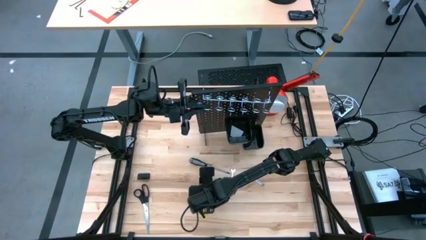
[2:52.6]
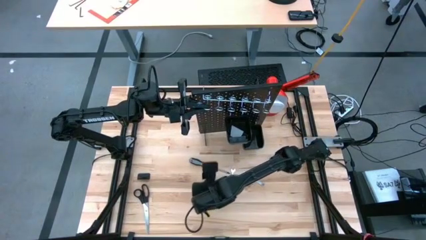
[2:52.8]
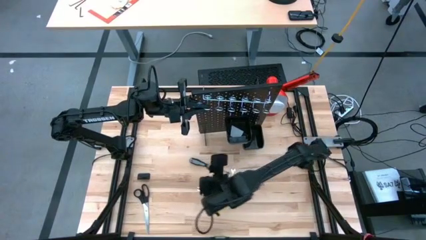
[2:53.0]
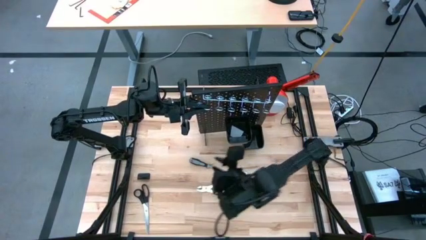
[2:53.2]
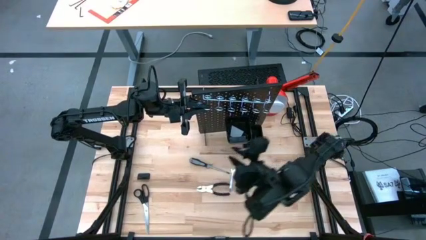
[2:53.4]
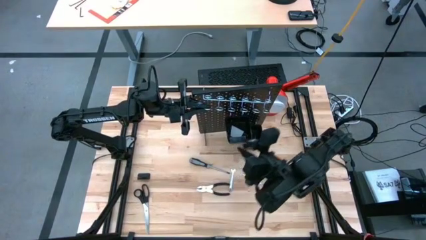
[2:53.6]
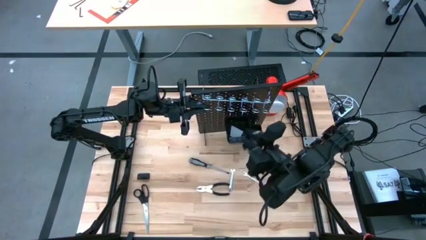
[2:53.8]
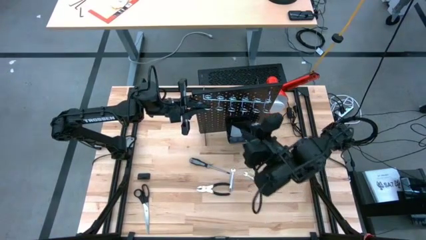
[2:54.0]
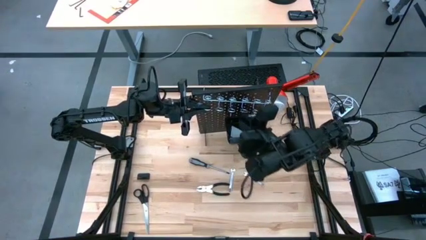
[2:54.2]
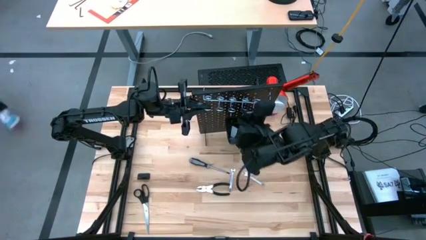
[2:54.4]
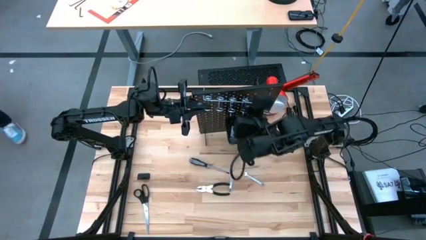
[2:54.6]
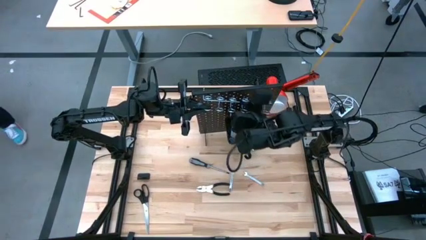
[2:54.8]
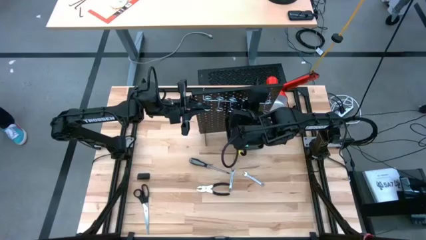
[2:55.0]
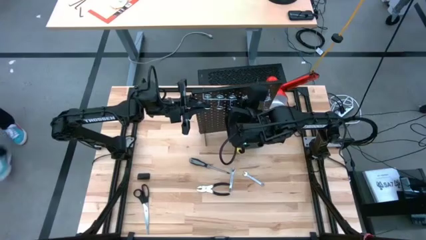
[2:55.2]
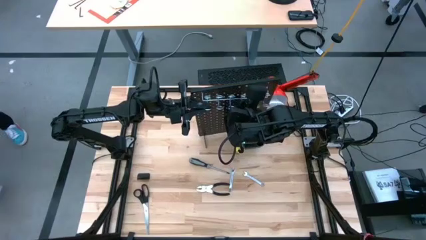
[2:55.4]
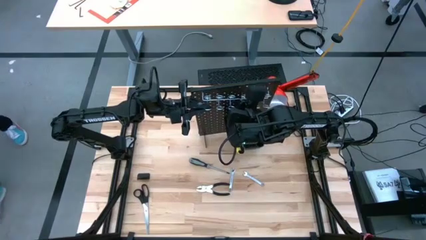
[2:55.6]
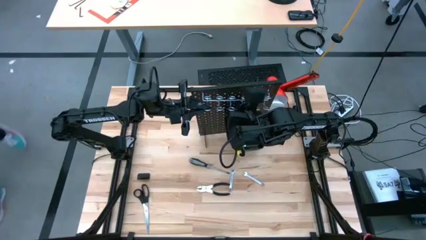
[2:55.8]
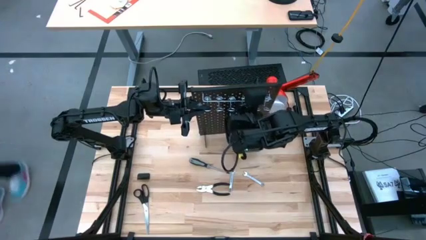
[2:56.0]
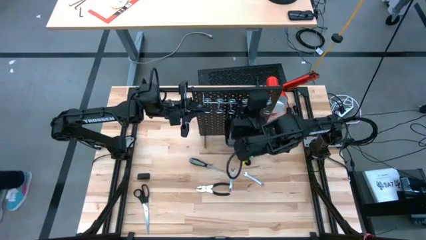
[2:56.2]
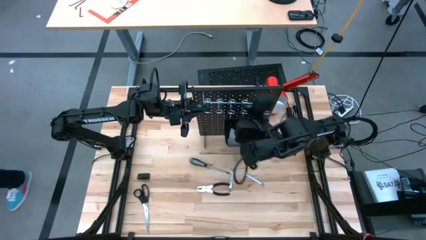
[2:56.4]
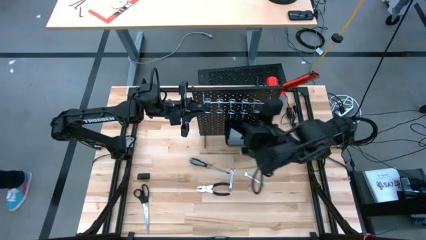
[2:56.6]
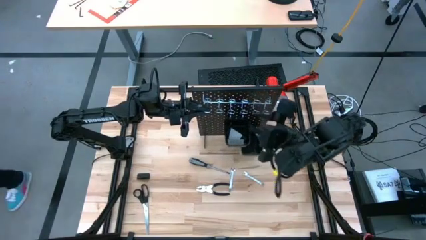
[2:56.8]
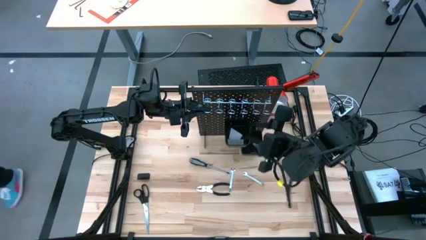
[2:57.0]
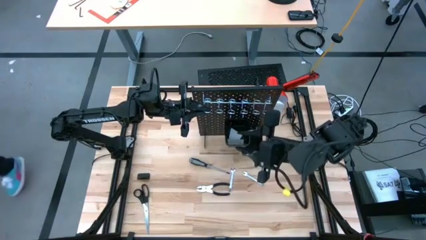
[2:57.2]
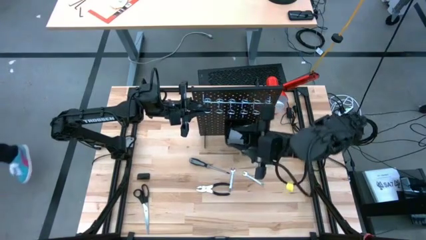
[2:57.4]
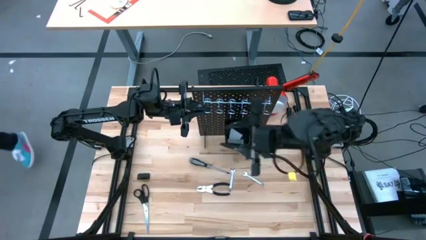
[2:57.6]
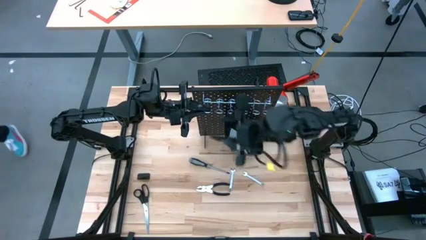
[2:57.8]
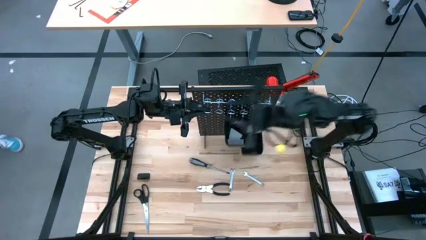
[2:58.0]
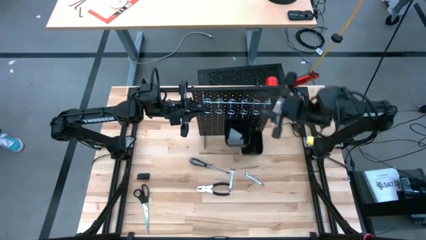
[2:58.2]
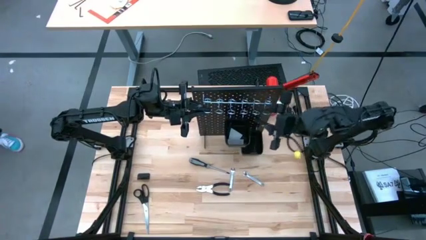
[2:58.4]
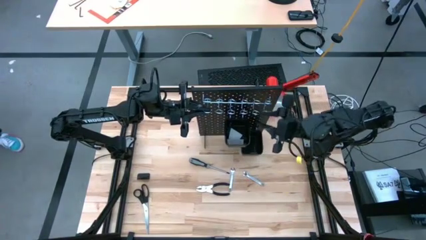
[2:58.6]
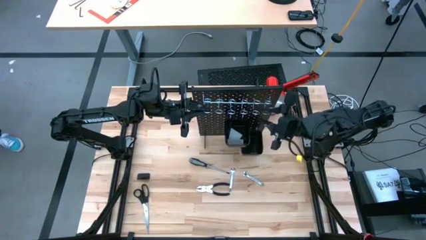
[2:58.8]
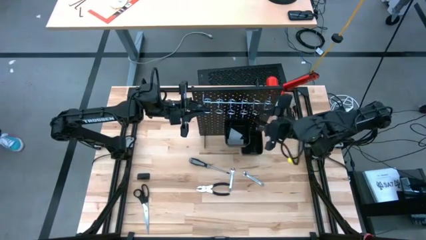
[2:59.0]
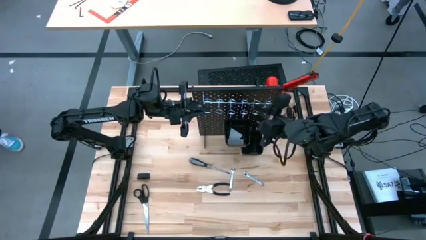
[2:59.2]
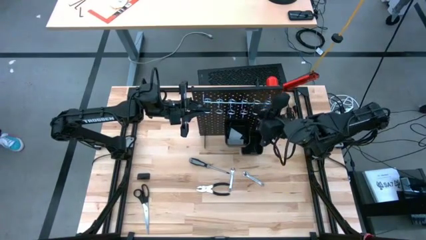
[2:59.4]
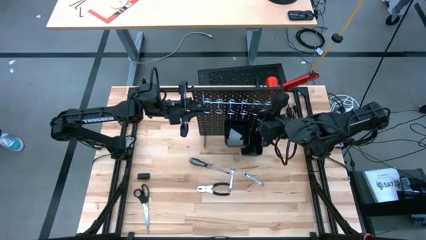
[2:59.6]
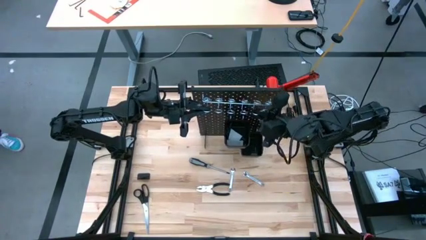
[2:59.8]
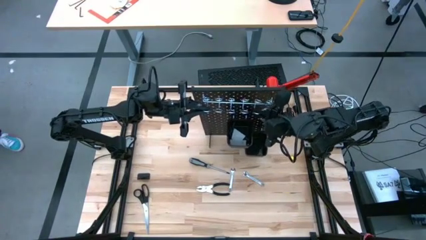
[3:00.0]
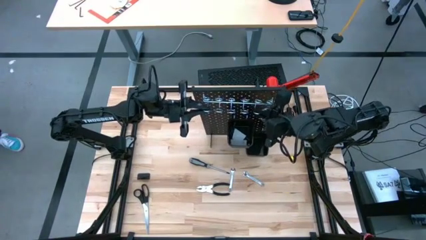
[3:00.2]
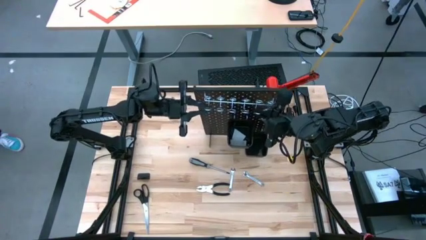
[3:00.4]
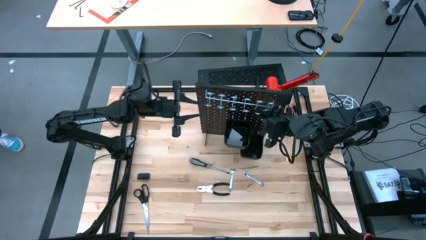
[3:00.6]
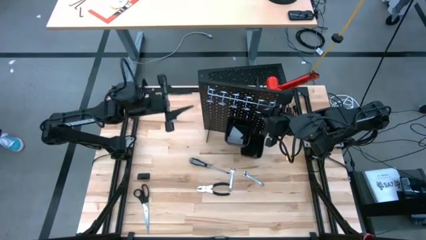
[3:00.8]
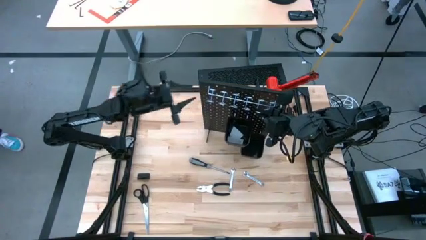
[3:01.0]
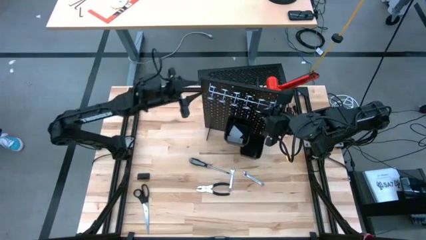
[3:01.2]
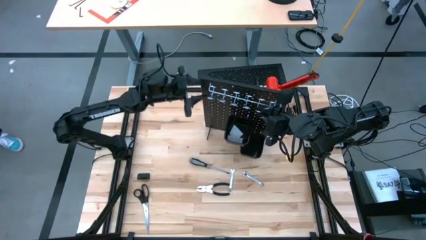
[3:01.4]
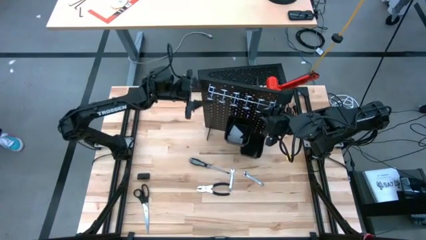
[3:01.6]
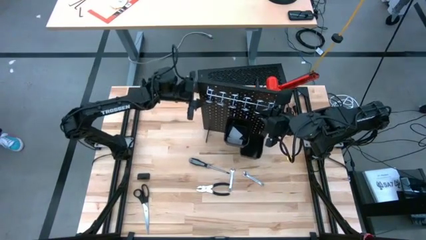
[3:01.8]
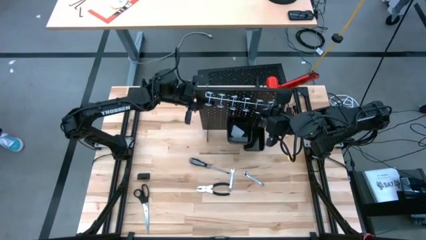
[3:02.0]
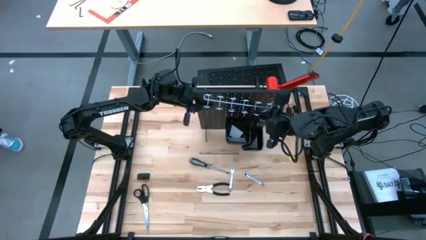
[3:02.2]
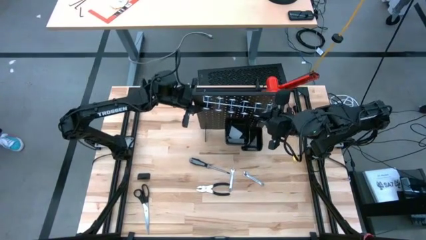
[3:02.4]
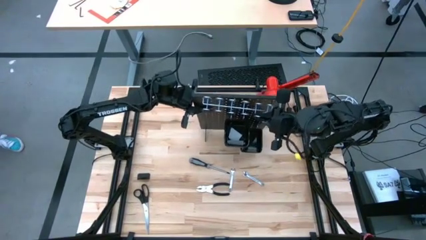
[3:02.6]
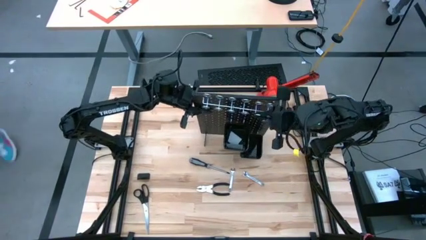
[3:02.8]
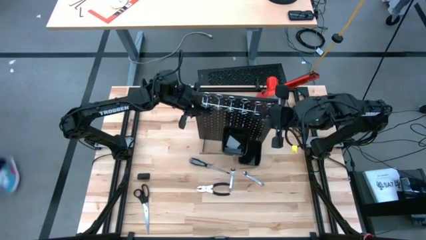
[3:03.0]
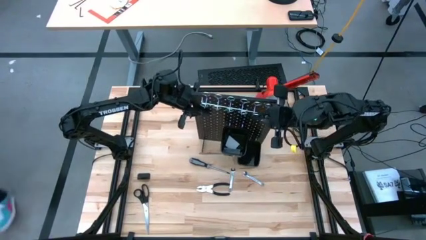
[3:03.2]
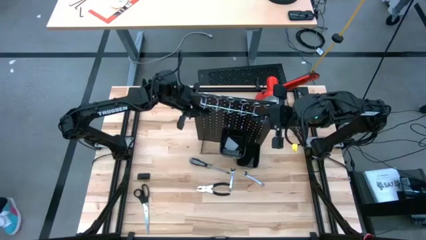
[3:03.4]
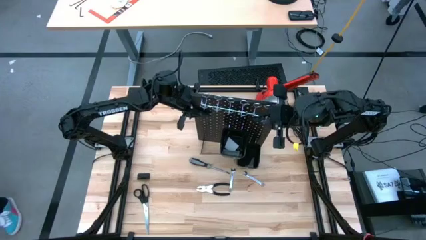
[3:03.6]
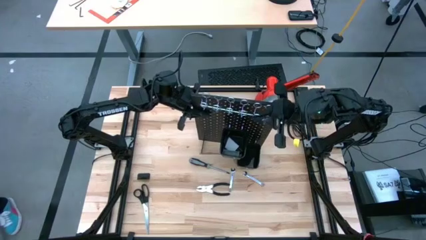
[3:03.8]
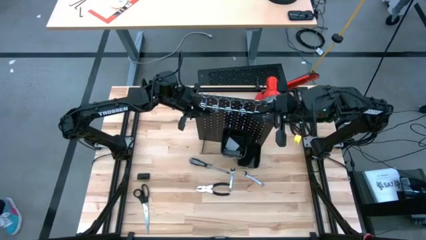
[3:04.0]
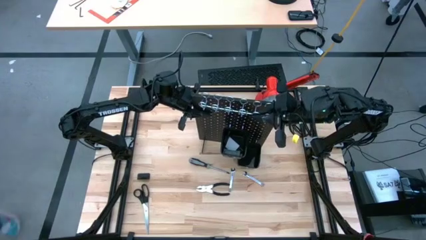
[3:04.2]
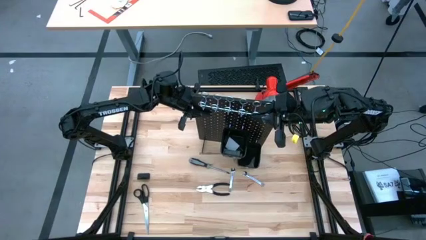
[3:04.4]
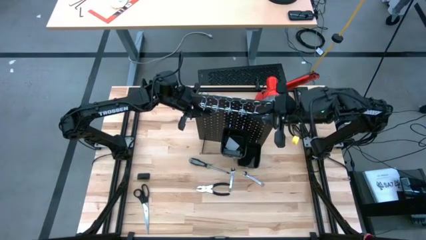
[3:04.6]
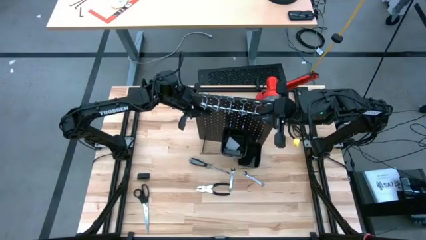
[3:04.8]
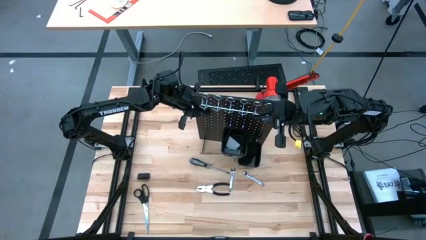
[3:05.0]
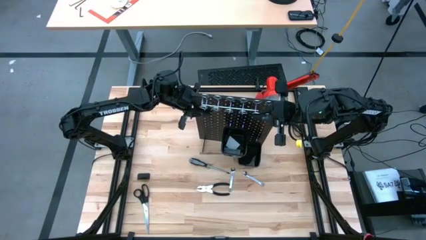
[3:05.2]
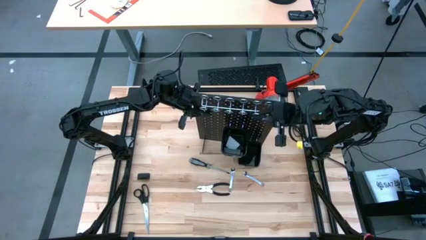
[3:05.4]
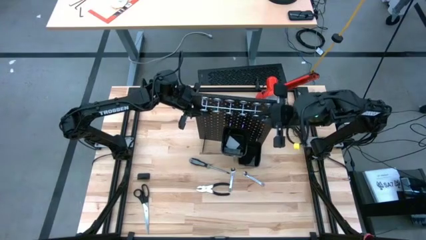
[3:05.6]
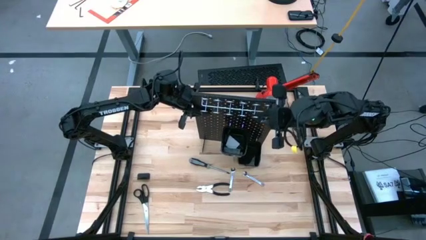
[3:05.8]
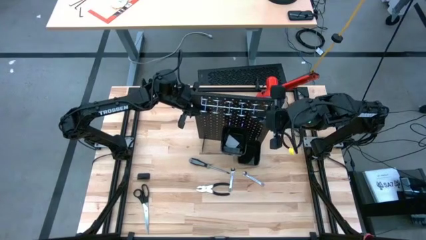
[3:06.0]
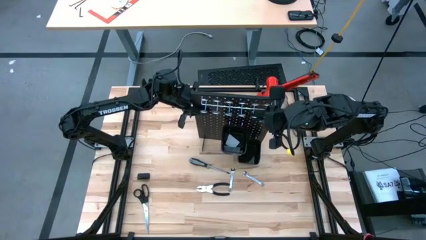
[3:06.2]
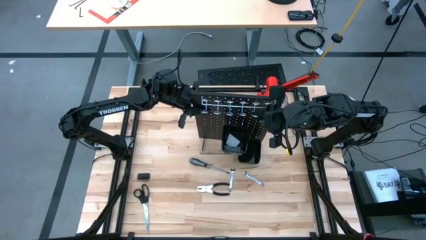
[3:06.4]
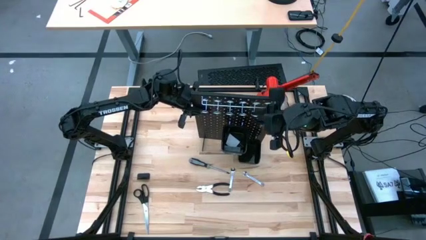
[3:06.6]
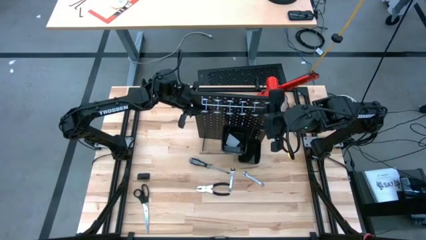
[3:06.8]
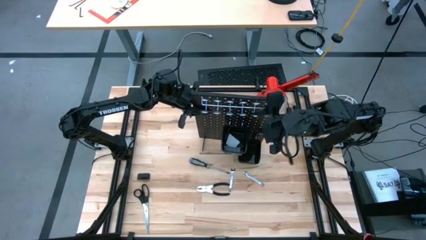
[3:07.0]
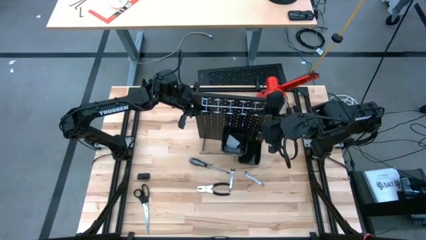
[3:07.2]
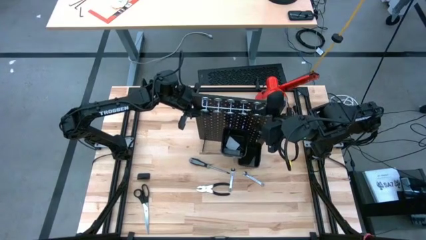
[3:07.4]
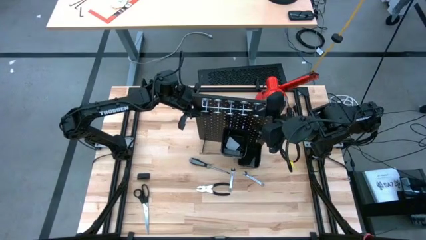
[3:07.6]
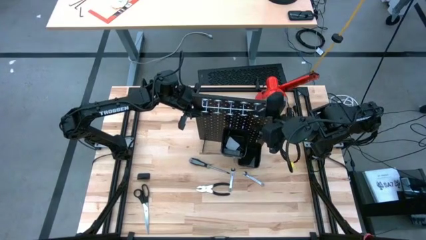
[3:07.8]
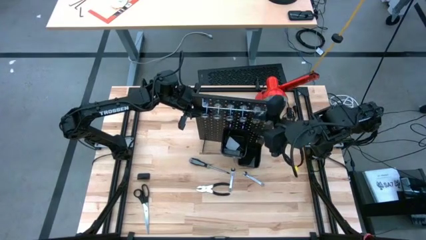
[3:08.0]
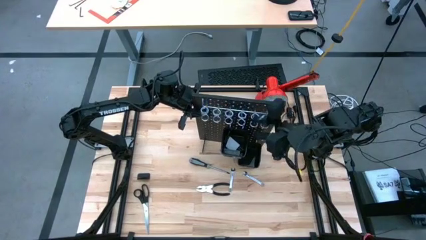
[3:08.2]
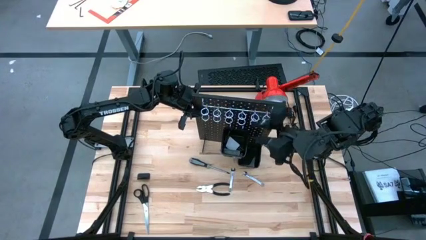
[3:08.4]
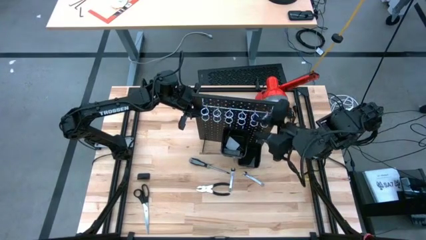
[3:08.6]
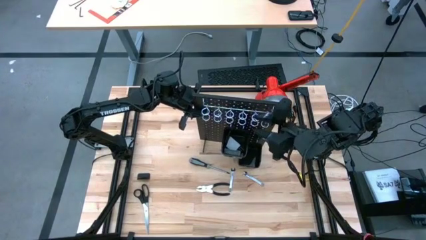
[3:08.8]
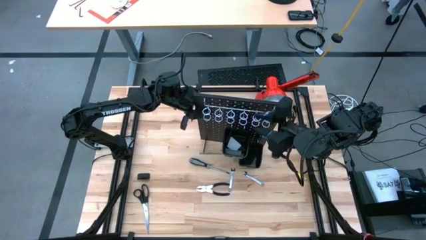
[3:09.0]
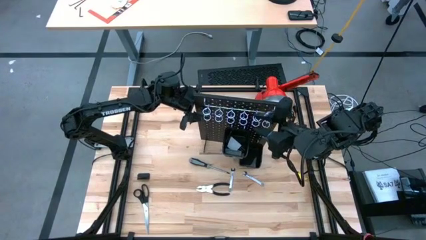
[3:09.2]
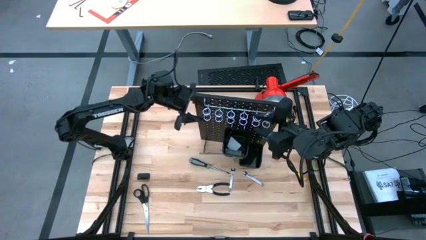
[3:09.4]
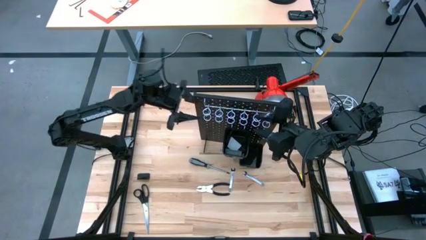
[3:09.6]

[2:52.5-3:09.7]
Task: Hang tools onto peg board
Adjust the pegboard
